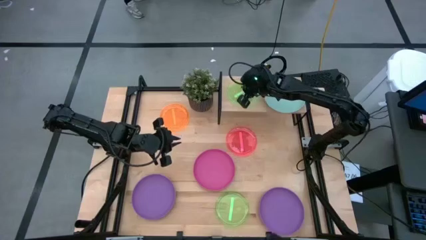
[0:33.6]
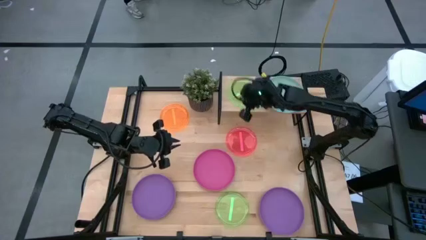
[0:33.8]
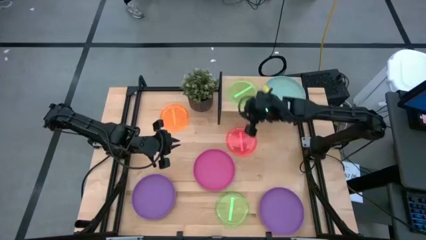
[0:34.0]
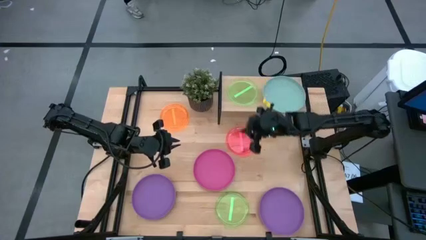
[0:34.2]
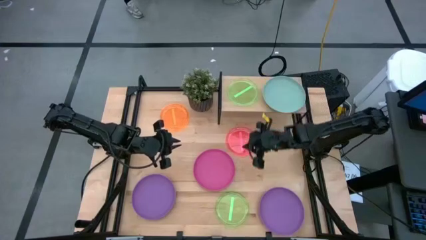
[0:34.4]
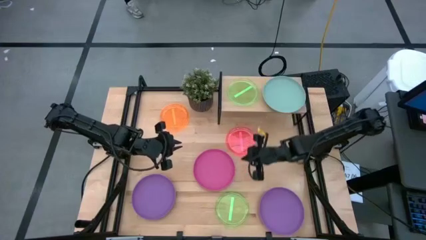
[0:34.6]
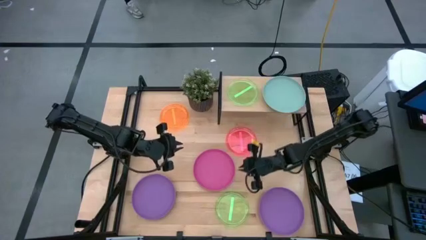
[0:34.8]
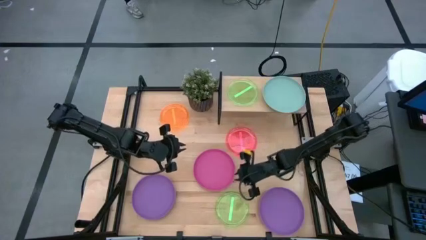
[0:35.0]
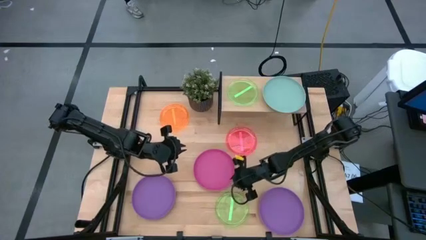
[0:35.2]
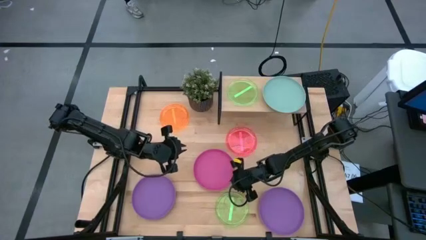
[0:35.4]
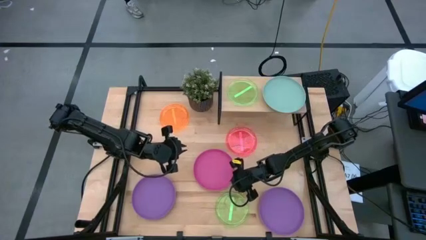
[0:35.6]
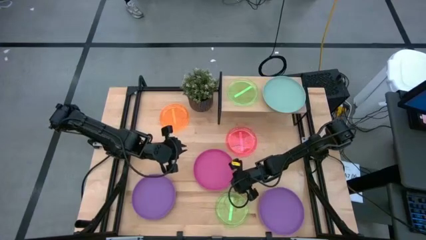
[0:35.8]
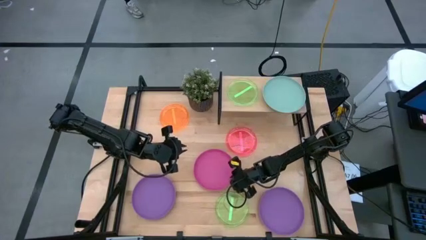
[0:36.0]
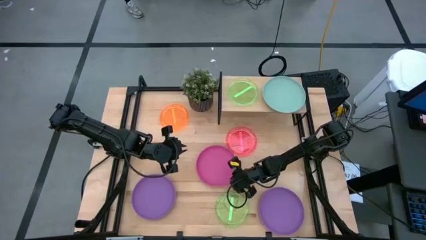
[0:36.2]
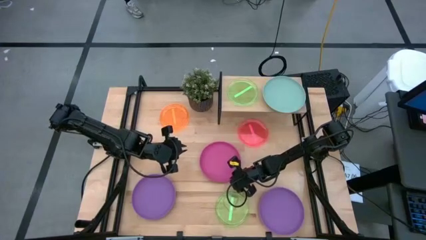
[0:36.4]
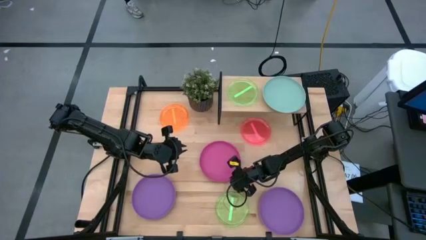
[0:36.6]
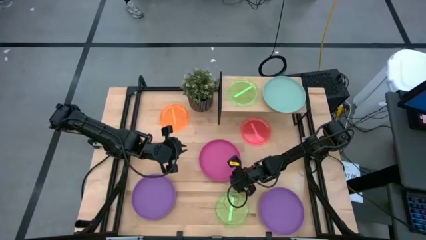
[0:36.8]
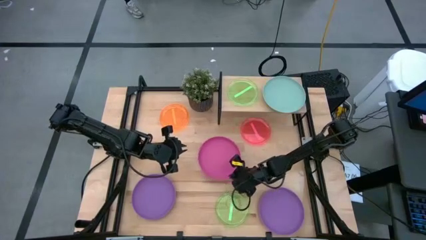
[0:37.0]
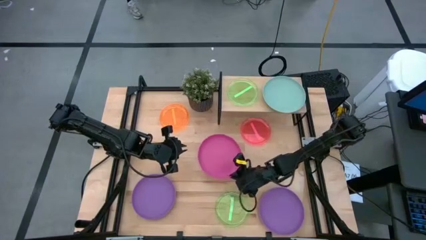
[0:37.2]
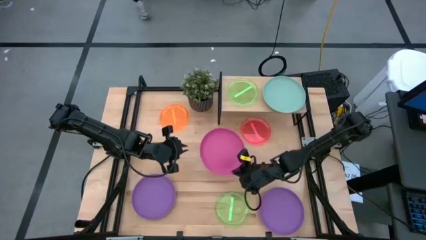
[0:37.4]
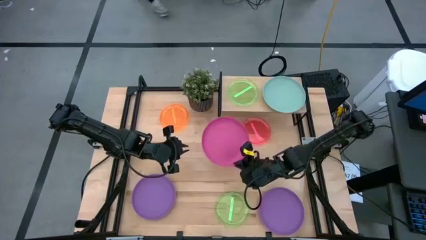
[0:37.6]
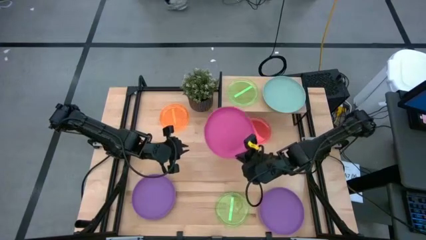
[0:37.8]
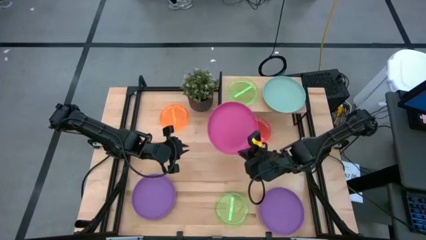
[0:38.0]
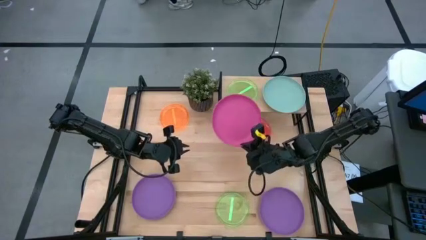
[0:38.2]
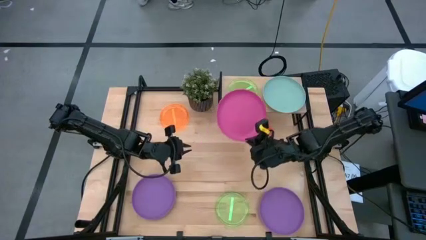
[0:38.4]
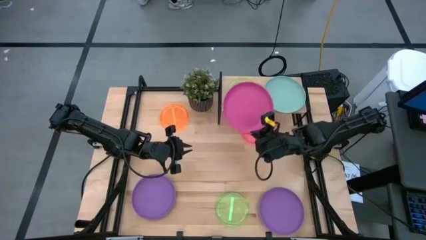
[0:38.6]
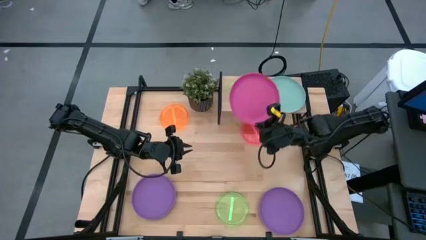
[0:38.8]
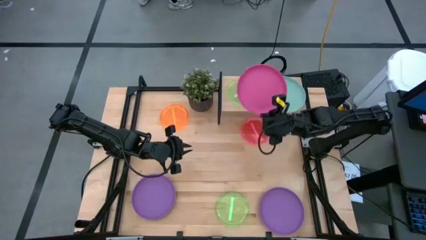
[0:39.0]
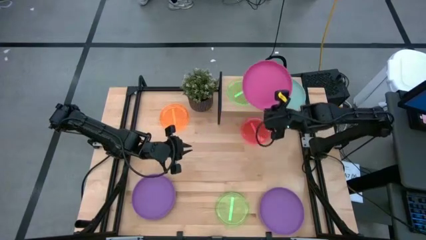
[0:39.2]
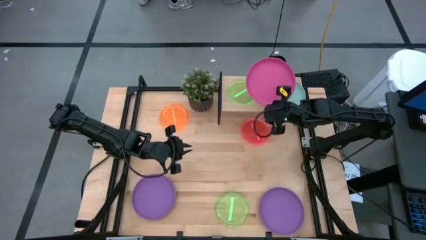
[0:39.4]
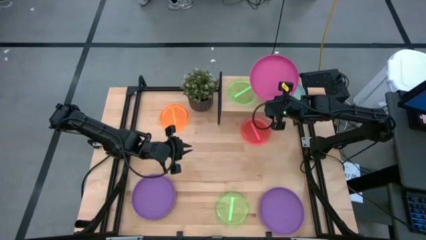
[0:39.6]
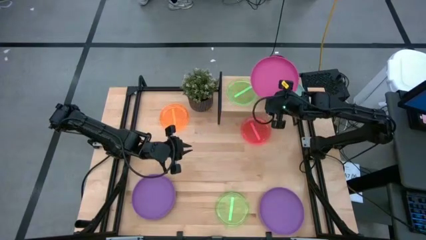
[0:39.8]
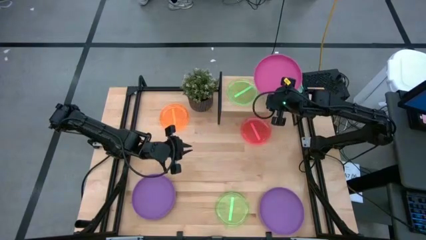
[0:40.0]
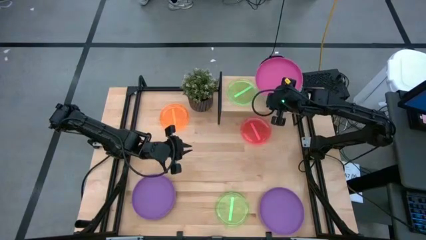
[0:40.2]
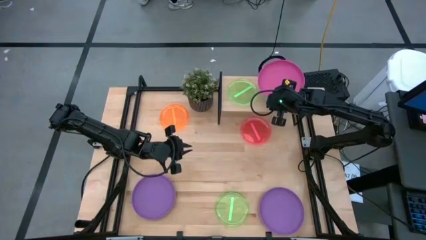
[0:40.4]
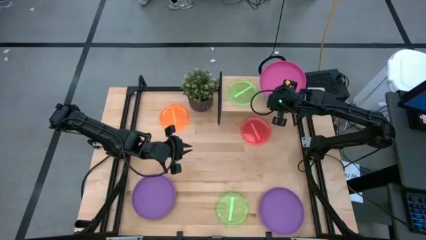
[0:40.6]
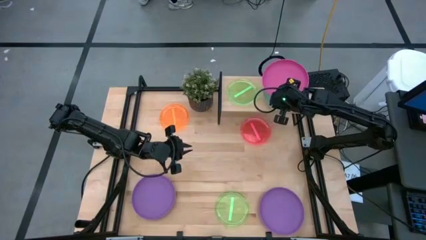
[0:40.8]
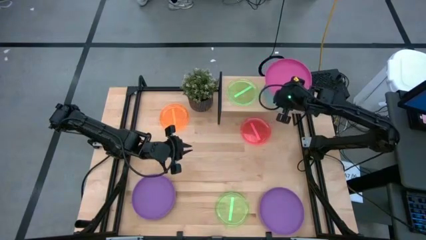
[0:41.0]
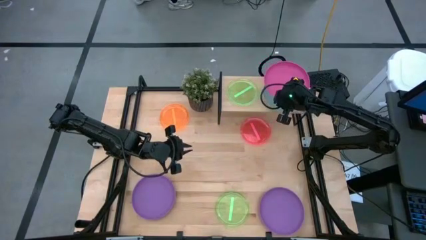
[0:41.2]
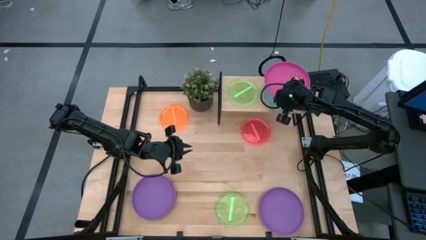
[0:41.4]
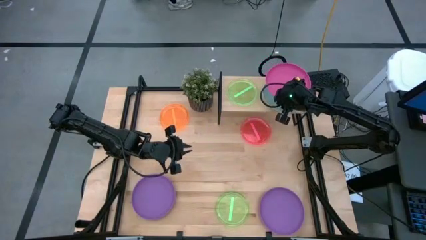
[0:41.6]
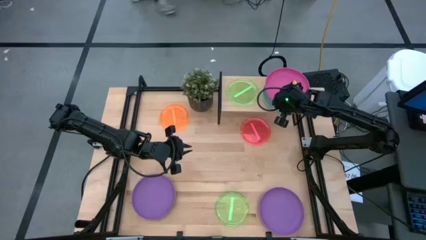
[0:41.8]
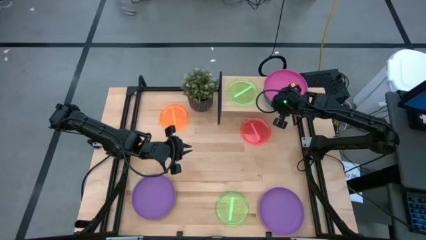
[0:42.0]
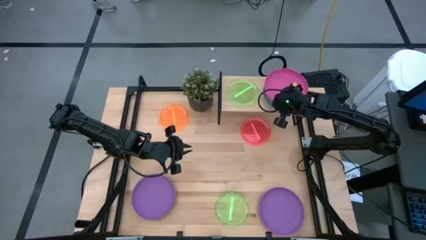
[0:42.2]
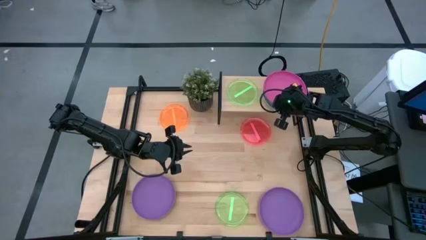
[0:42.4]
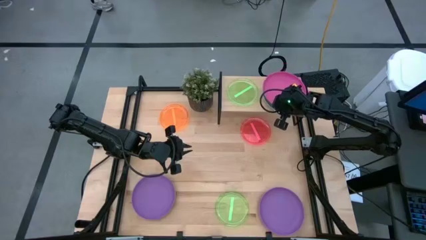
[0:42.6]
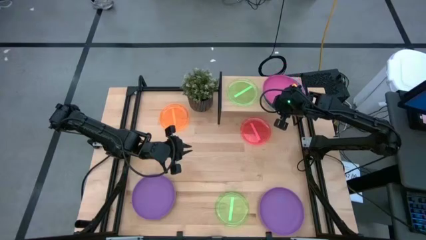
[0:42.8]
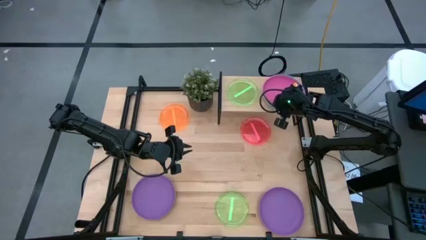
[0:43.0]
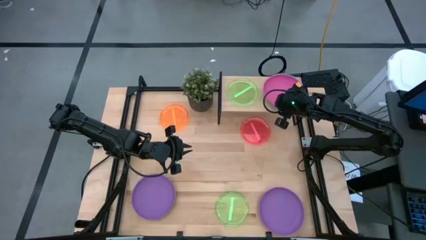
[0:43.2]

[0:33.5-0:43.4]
Task: Place and stack plates onto a shelf
Stack the pink plate on top of the green plate on the shelf

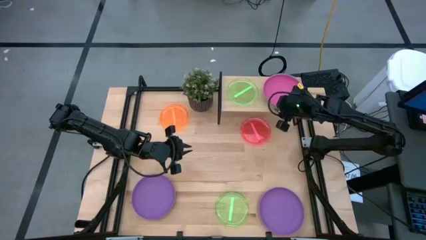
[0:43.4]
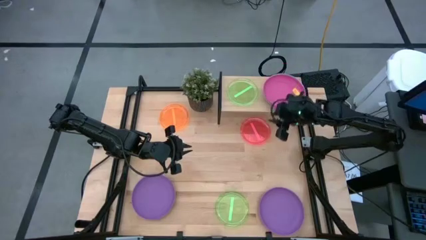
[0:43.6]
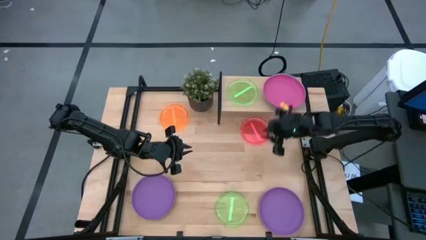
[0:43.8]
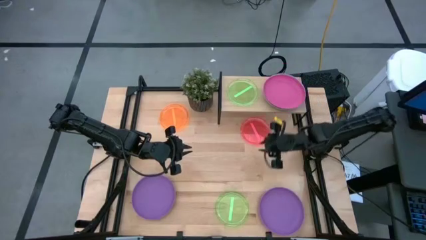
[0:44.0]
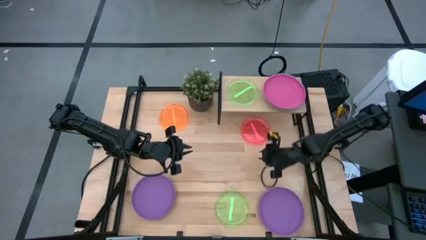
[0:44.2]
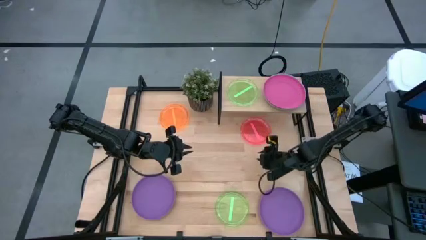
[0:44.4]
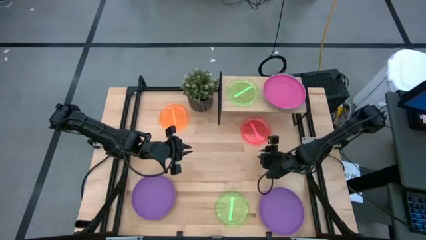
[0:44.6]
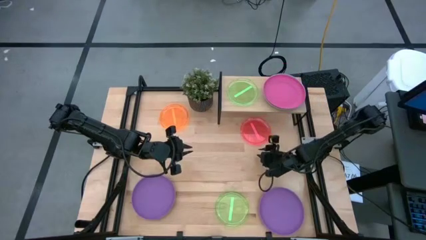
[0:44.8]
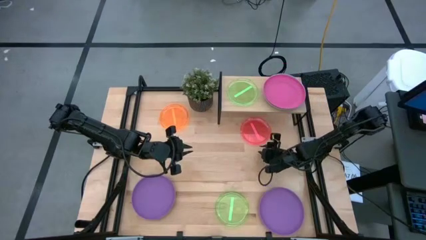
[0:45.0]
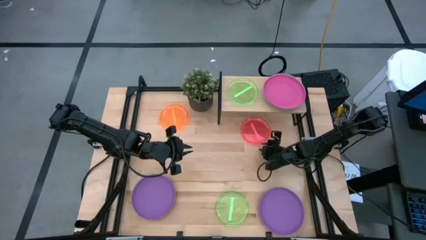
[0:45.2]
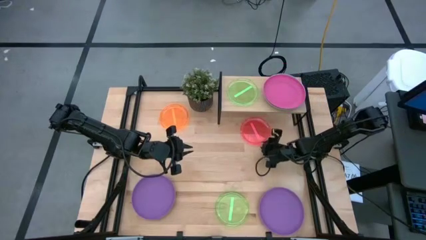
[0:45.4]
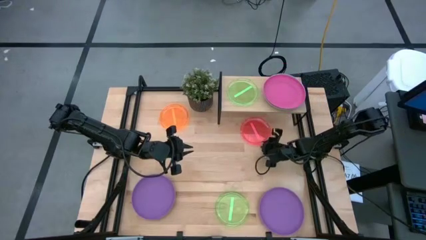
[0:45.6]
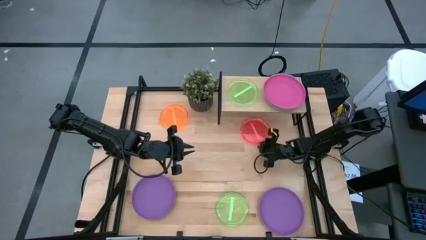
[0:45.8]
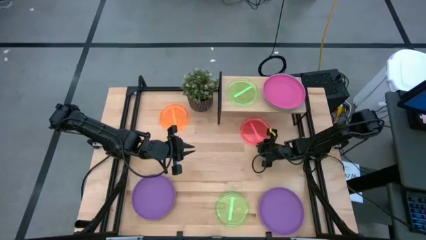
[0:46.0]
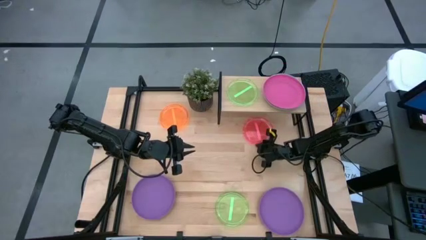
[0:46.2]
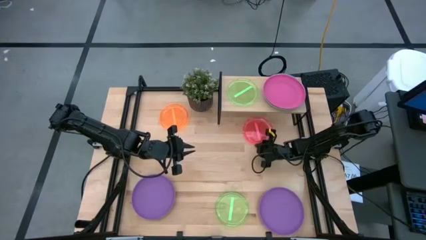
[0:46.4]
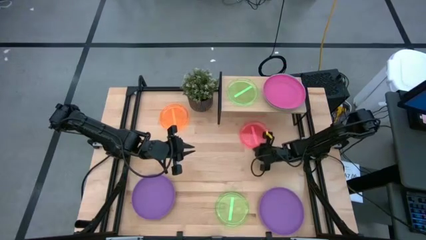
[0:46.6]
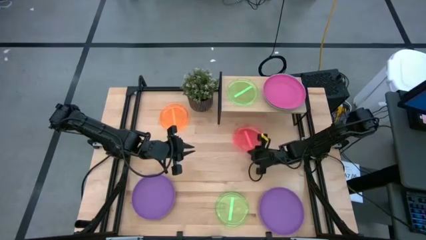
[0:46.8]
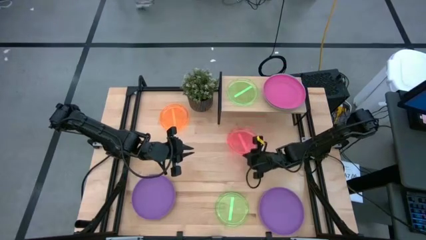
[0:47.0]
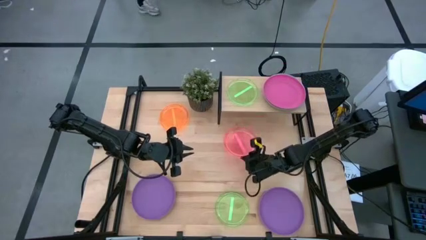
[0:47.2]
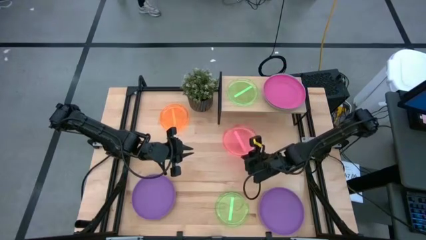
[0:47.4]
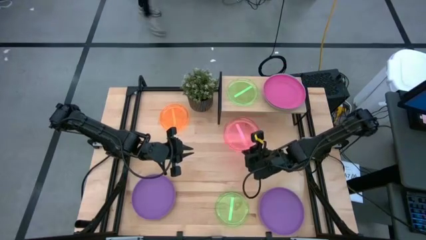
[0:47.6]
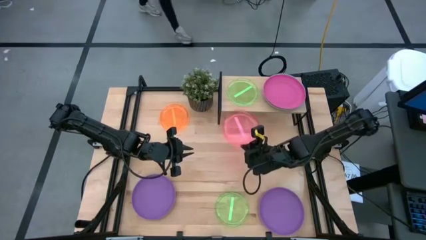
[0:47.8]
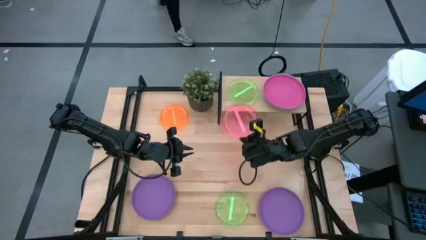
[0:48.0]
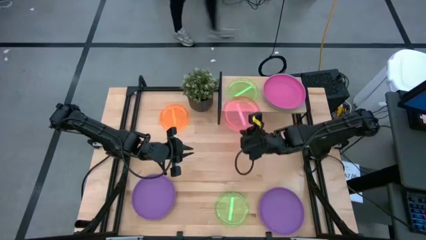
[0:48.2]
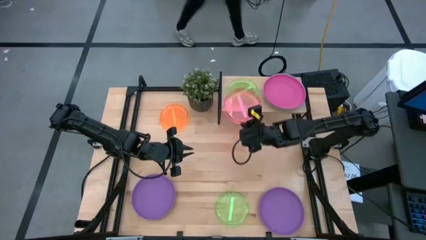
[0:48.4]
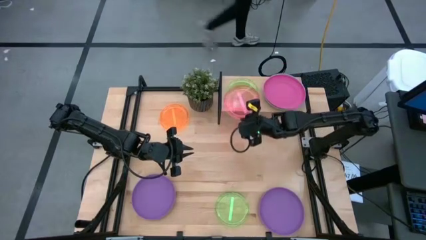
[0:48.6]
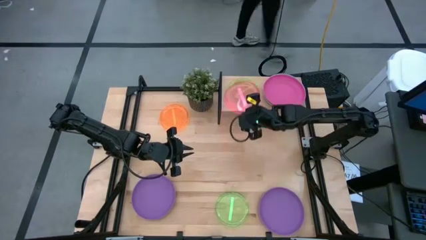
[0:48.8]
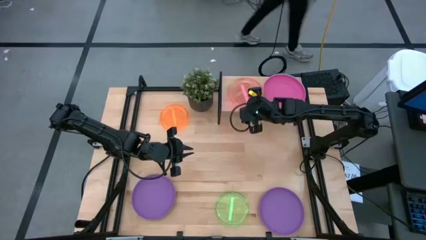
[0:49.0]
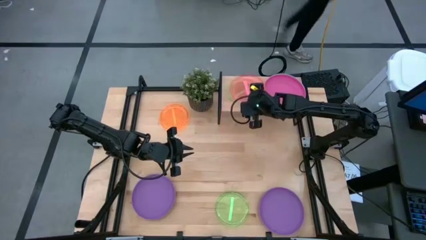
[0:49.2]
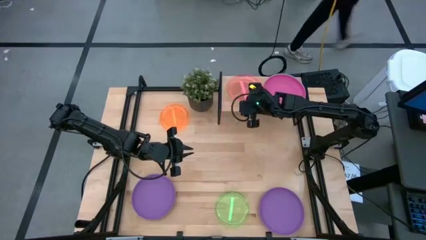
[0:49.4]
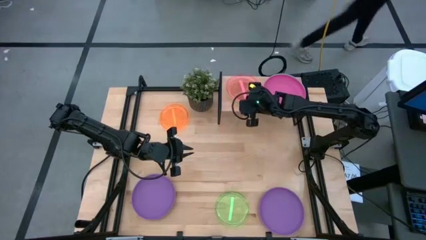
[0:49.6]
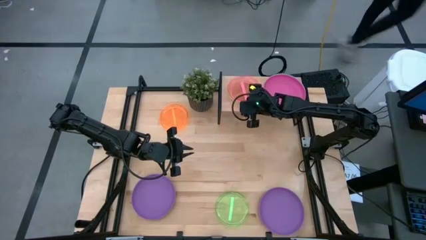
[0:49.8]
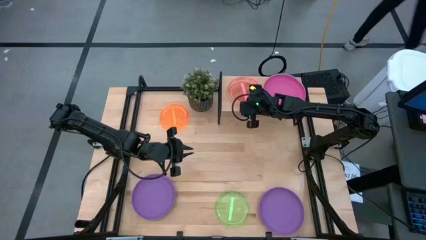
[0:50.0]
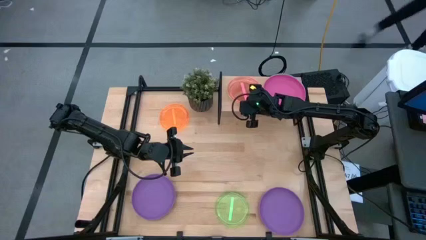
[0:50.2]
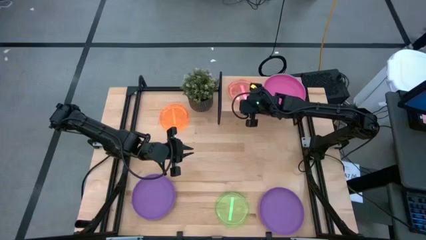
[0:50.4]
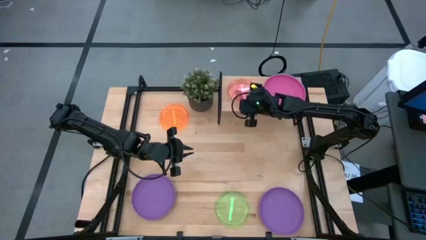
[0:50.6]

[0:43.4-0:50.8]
Stack the light pink plate on top of the light green plate on the shelf
